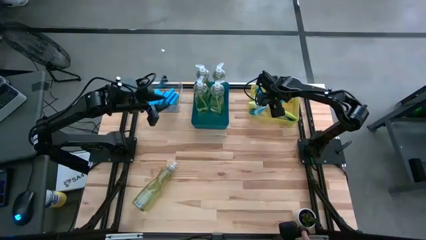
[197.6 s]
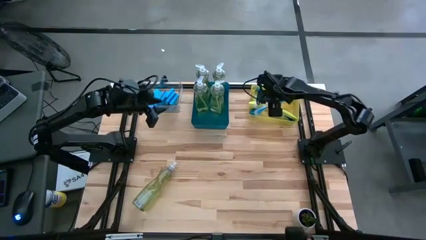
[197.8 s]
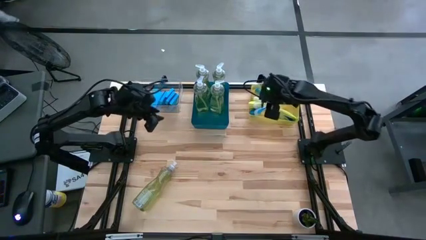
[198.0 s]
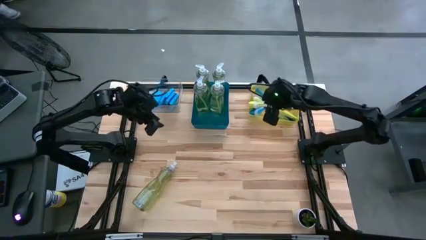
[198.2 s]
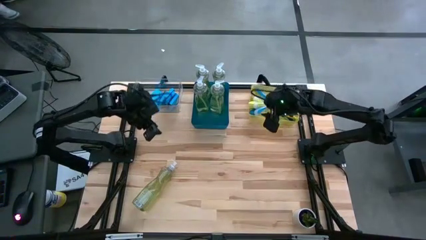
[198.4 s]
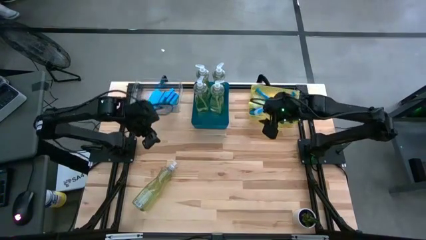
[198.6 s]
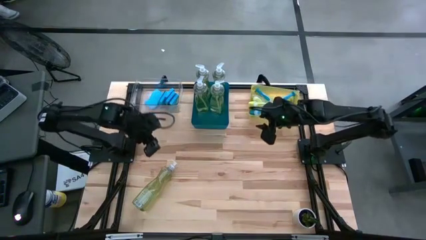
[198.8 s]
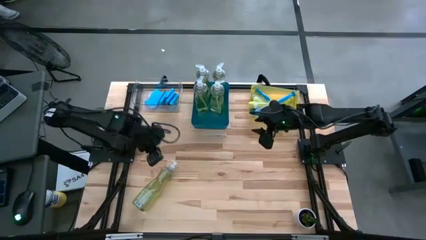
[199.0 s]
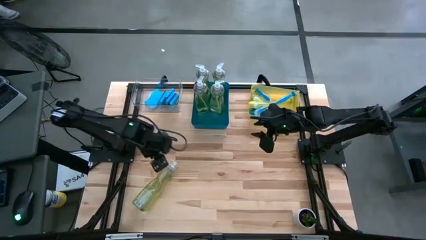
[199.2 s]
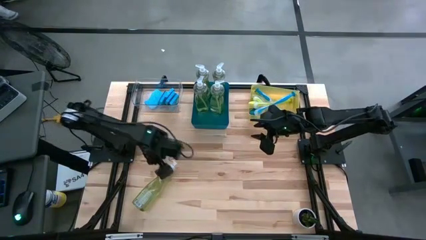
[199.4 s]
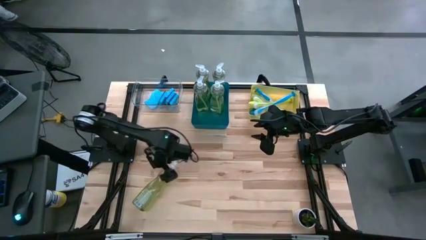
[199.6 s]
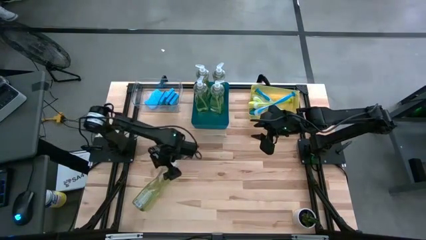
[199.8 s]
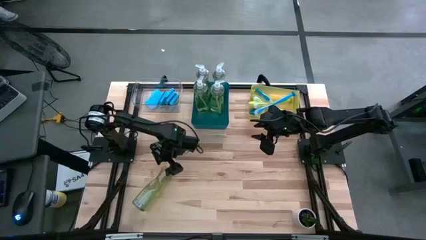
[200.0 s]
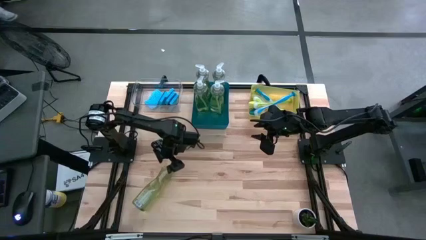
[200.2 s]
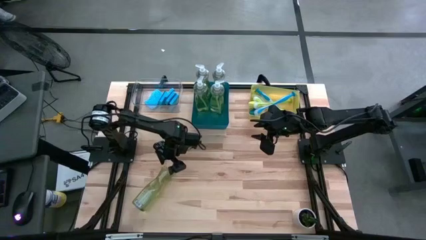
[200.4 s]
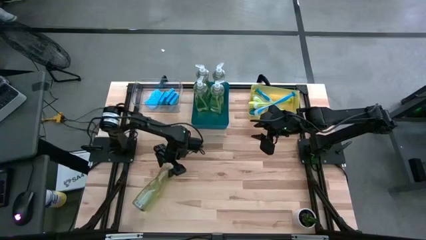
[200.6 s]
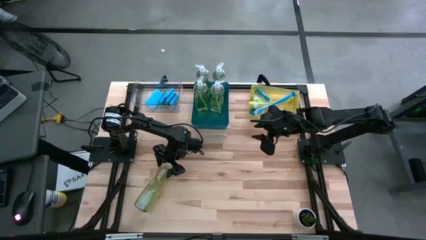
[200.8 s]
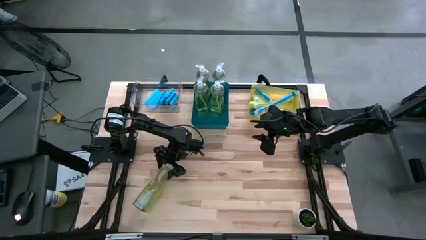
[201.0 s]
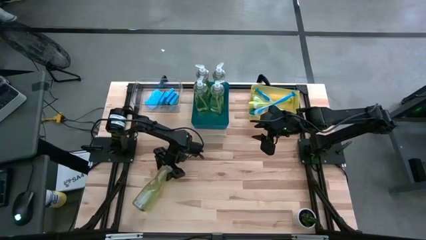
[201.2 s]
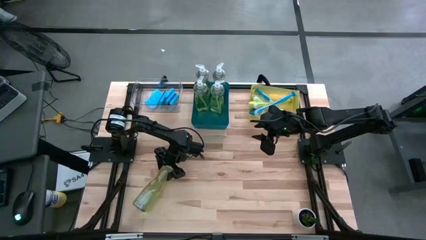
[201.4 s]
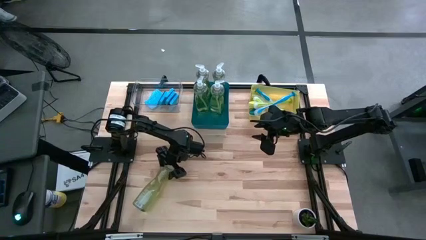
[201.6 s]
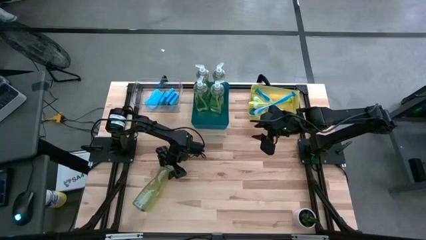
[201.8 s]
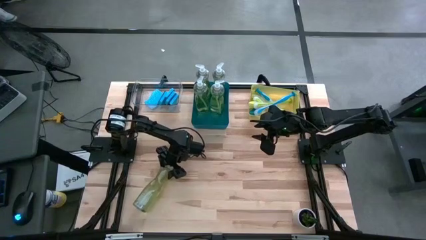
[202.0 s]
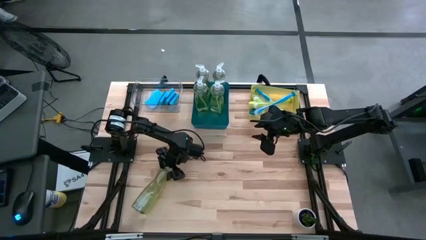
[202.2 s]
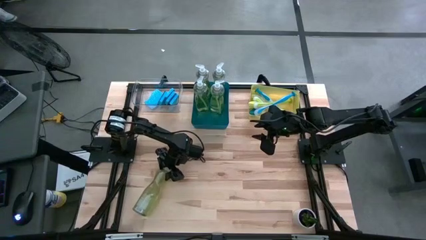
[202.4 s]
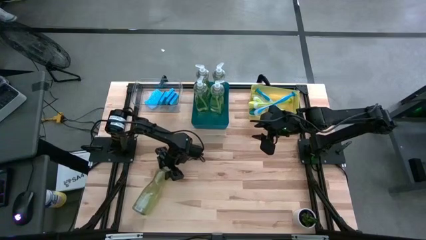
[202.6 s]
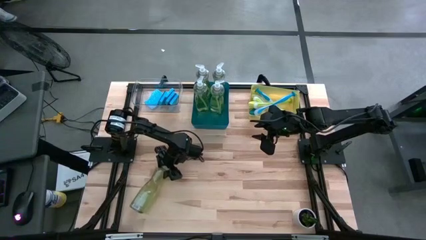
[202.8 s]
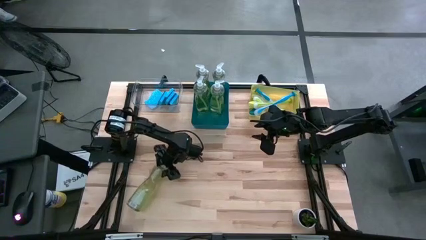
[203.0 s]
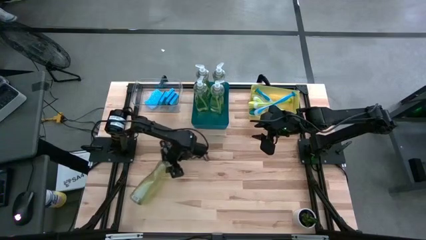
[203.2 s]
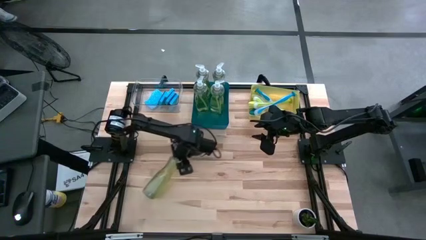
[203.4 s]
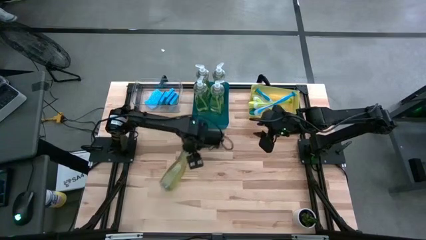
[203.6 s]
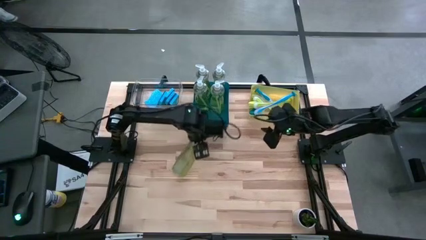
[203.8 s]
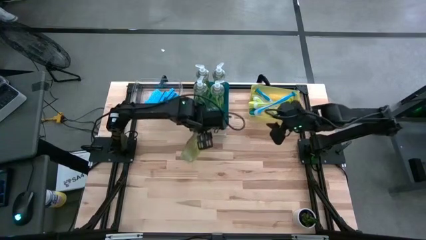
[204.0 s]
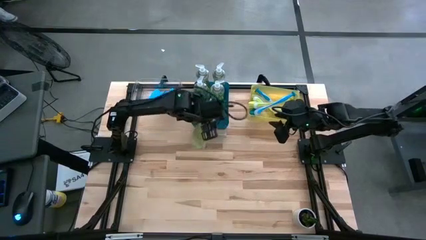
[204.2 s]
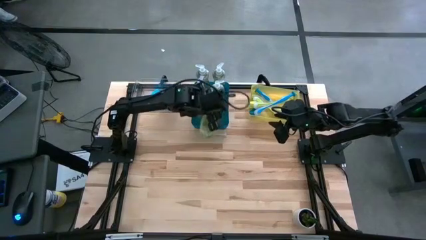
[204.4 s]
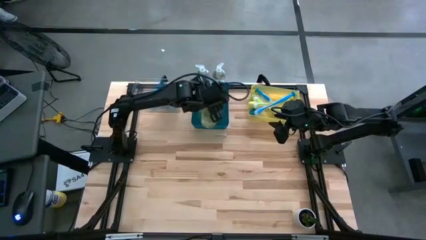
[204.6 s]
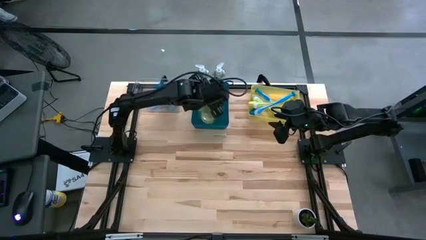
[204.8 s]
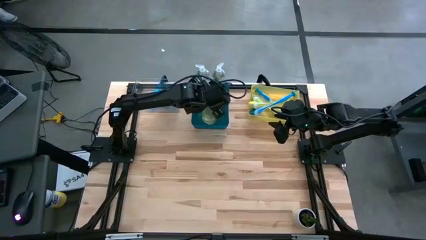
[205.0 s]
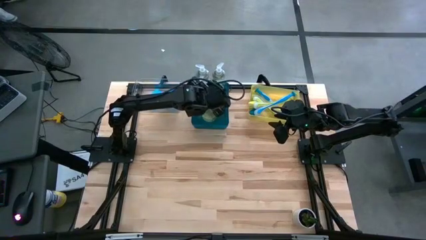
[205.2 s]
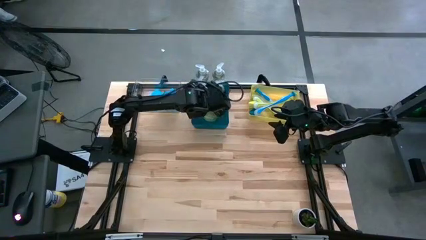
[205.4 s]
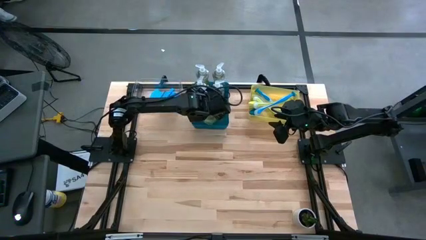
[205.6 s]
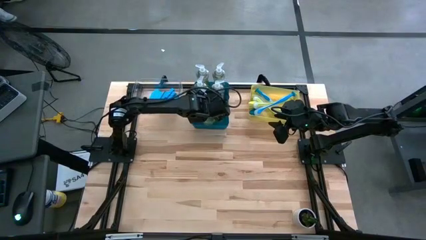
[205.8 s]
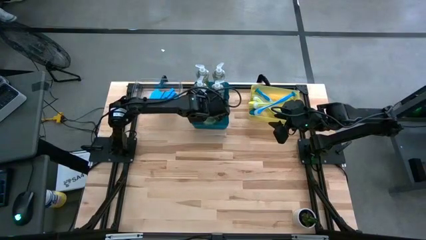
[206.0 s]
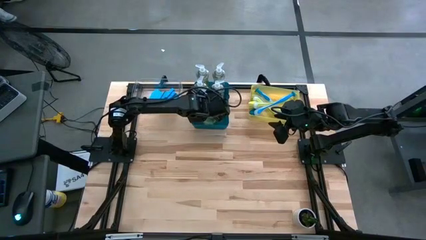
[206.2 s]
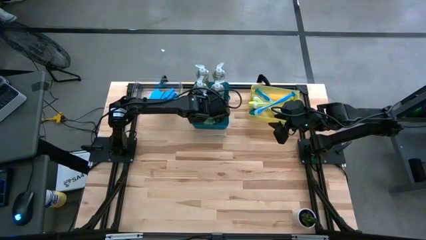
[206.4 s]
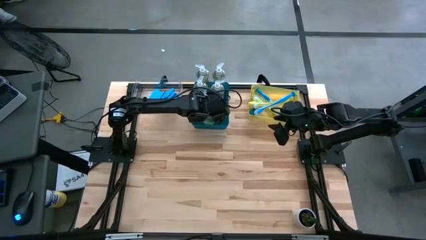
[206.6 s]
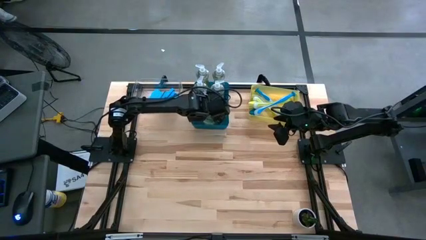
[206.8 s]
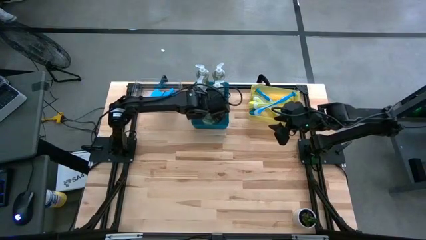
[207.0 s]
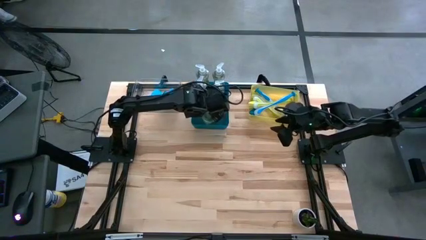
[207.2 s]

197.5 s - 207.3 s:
Task: Pick & Place Kitchen Sink Supplies
Put the yellow soap dispenser into the blue bin

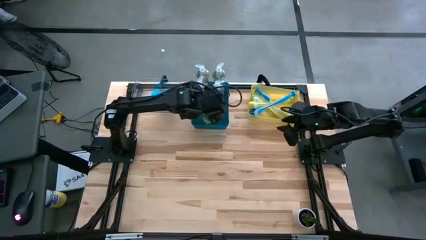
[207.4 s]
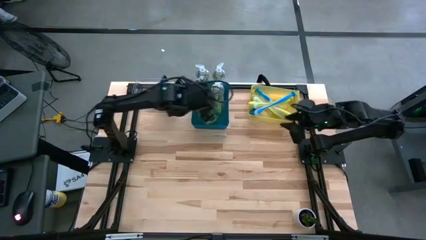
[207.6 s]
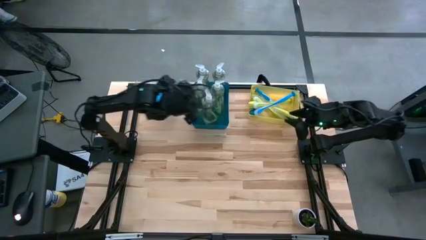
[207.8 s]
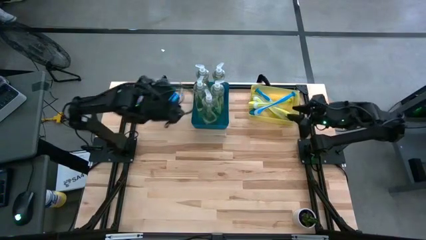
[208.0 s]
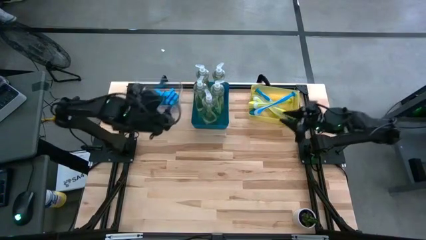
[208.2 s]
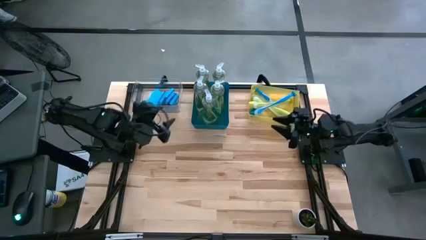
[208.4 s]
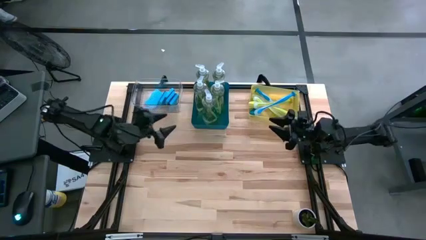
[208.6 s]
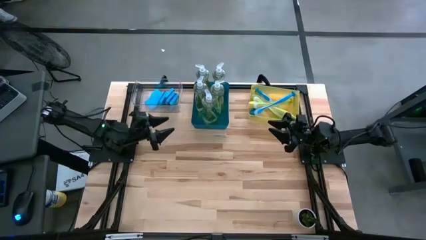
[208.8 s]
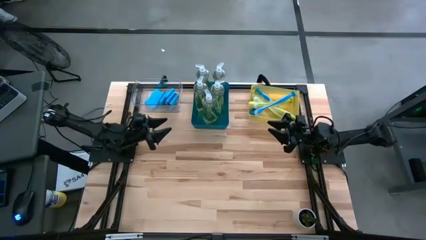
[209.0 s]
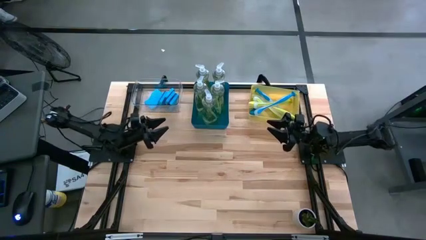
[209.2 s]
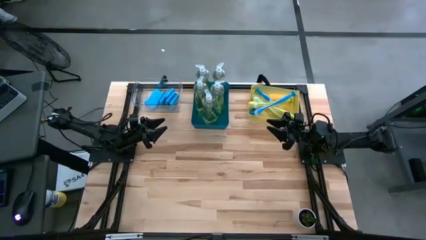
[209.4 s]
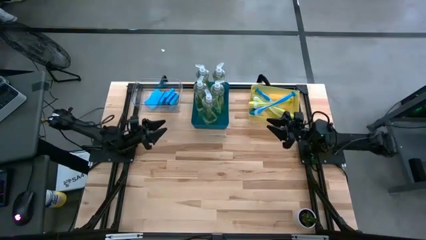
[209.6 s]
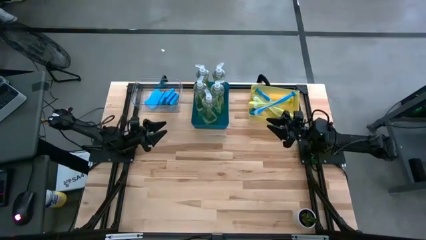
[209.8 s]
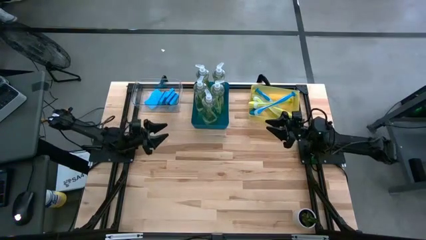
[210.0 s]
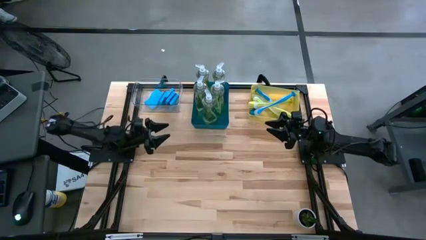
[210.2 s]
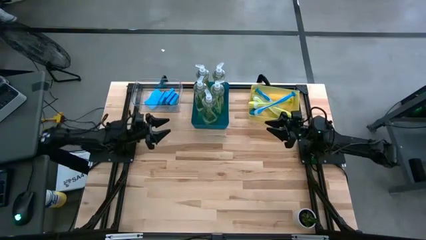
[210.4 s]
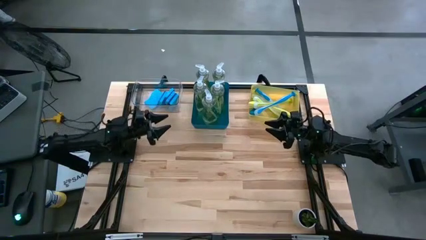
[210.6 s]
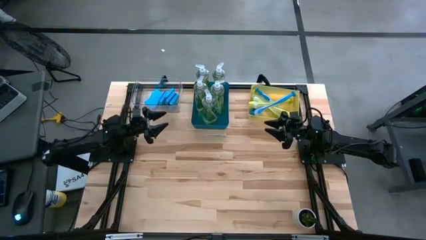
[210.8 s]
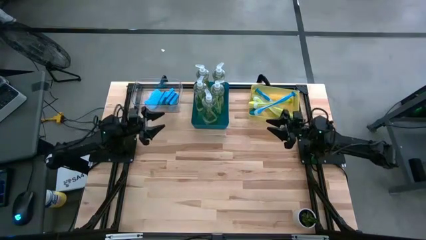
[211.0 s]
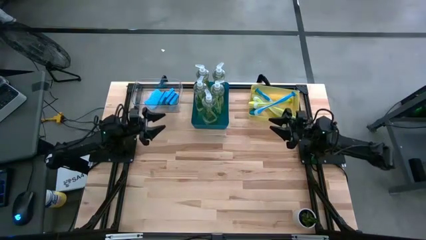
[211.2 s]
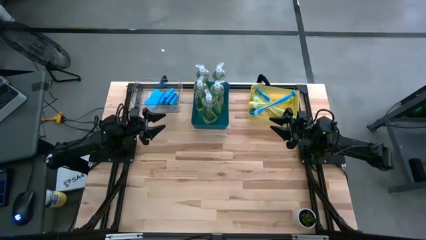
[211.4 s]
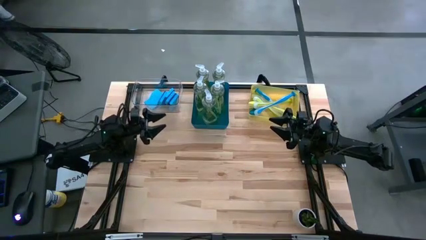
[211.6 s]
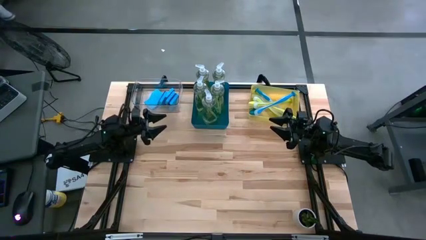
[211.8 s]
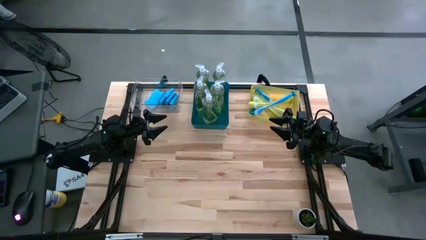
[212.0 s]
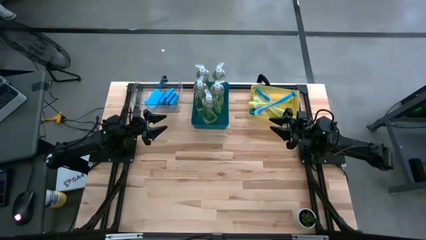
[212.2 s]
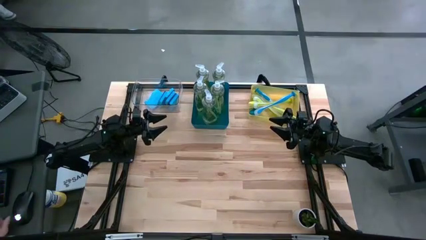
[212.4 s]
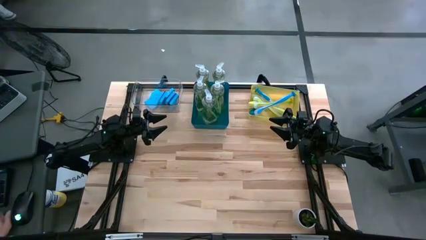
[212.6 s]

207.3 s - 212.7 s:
Return to Home Position
